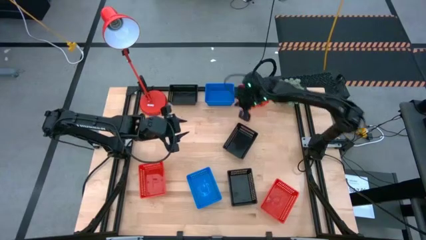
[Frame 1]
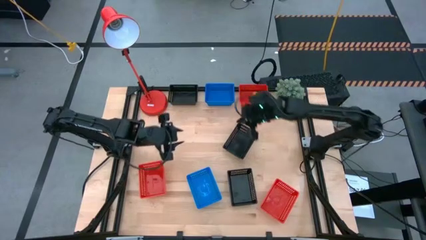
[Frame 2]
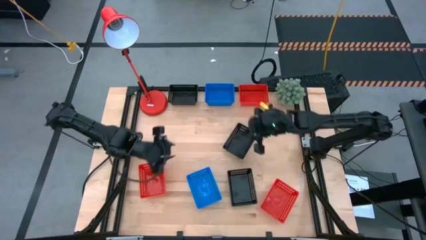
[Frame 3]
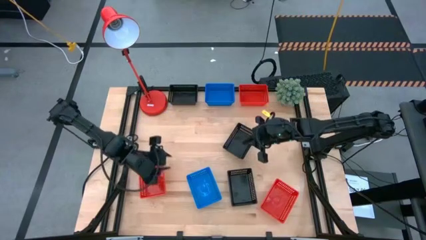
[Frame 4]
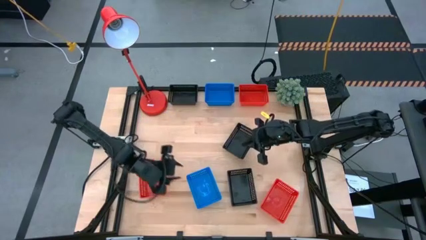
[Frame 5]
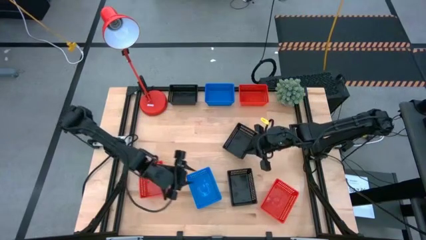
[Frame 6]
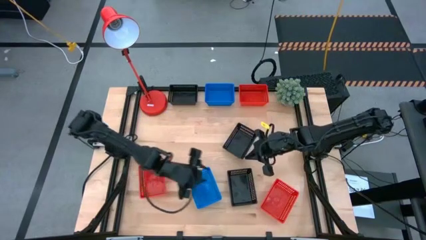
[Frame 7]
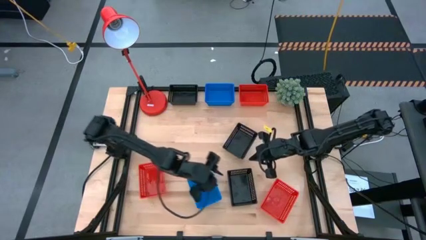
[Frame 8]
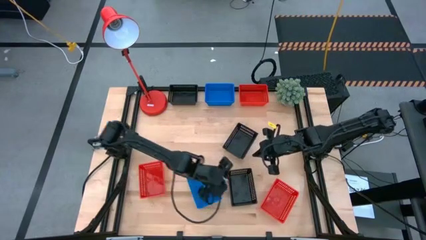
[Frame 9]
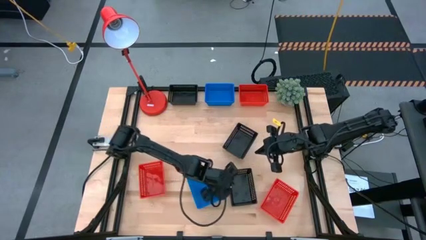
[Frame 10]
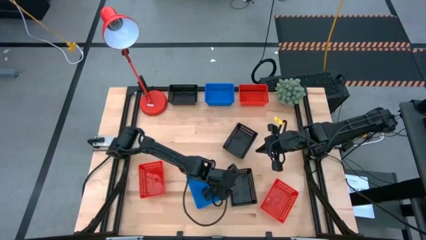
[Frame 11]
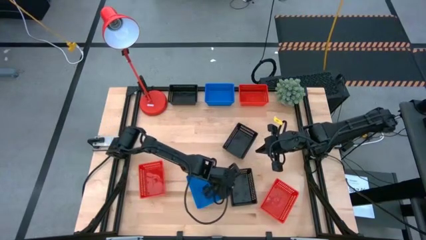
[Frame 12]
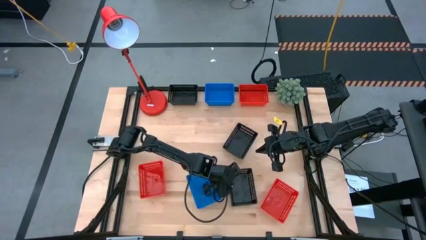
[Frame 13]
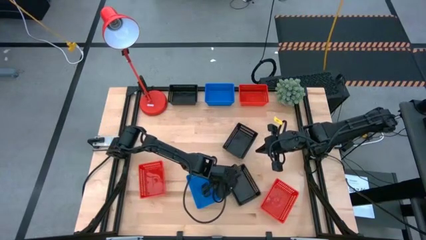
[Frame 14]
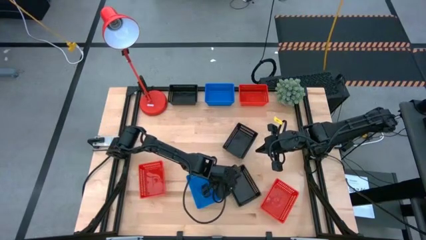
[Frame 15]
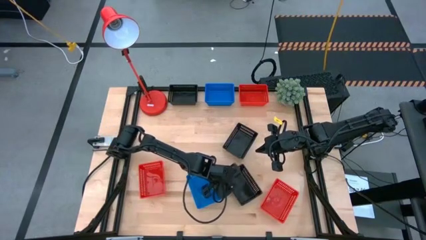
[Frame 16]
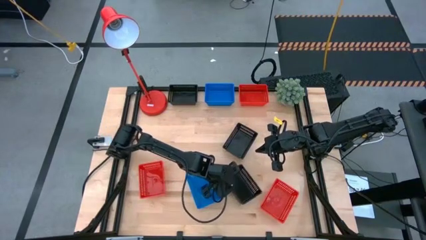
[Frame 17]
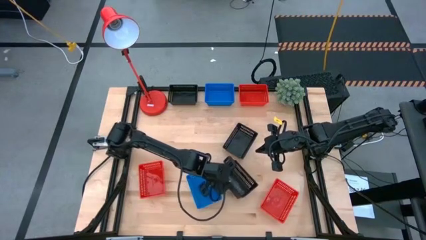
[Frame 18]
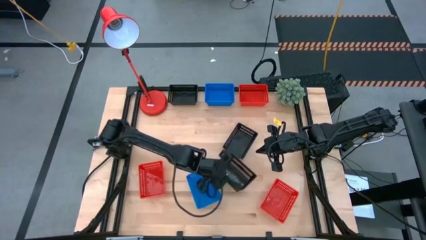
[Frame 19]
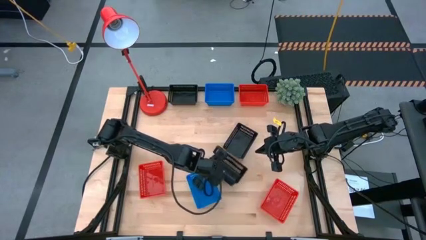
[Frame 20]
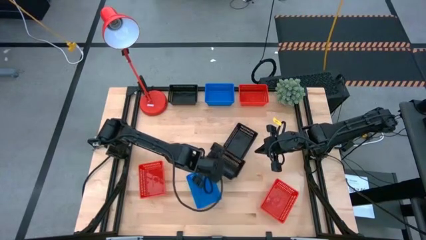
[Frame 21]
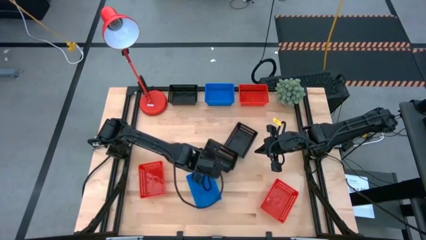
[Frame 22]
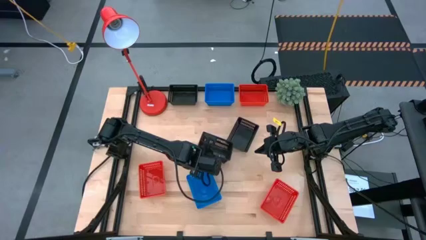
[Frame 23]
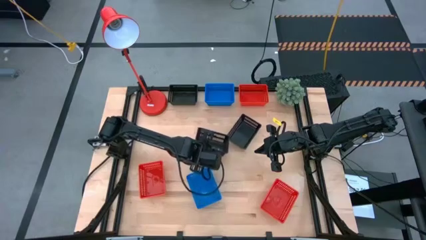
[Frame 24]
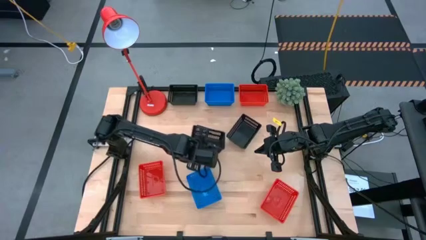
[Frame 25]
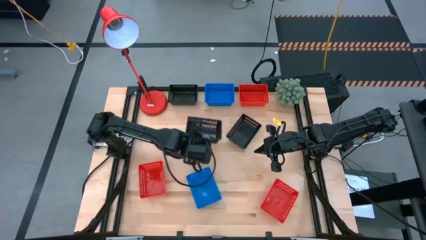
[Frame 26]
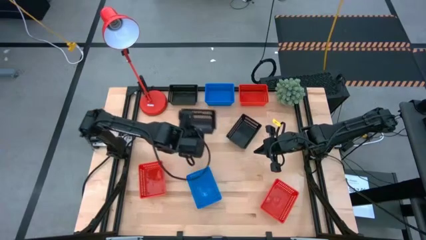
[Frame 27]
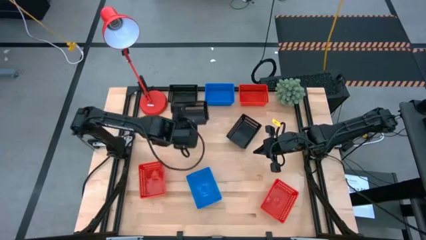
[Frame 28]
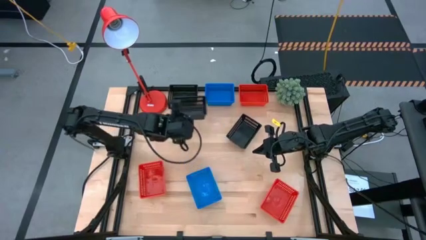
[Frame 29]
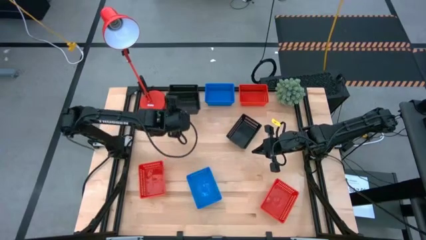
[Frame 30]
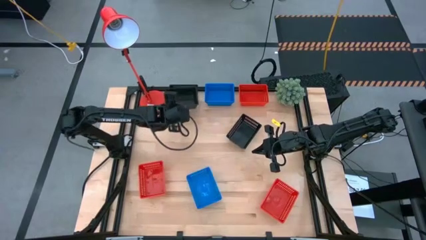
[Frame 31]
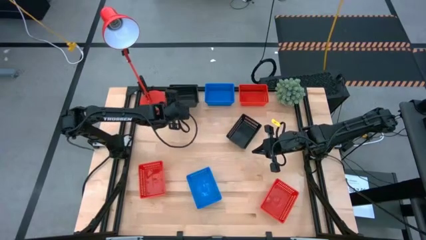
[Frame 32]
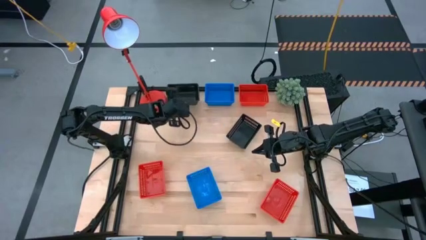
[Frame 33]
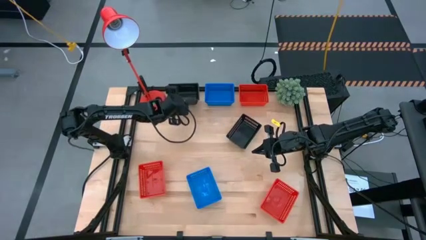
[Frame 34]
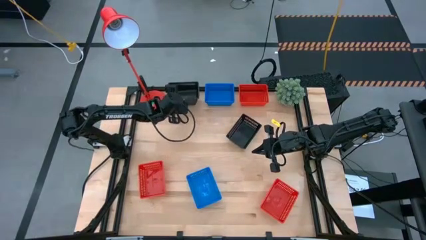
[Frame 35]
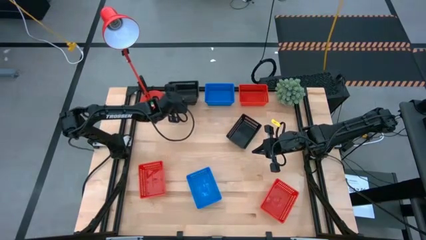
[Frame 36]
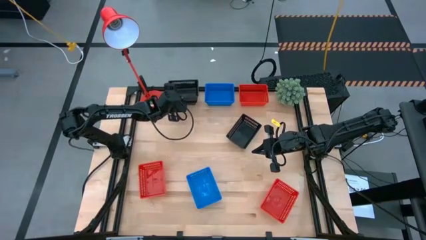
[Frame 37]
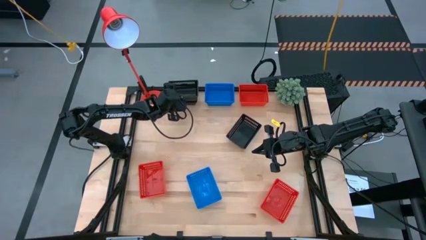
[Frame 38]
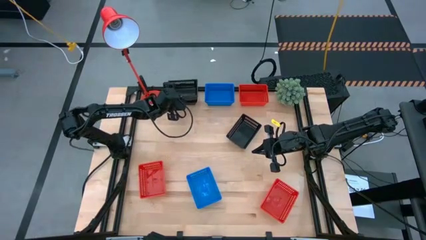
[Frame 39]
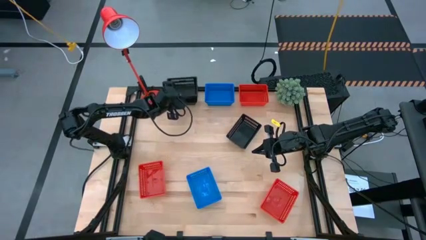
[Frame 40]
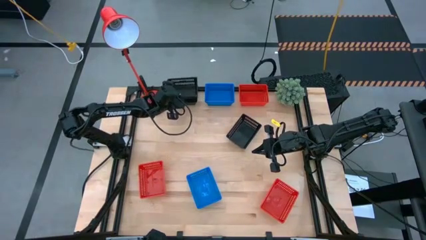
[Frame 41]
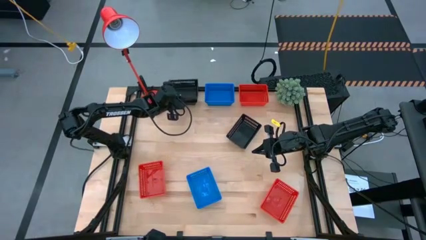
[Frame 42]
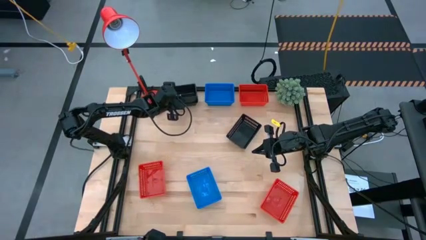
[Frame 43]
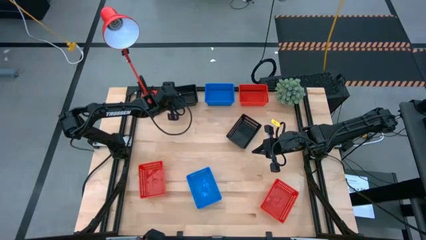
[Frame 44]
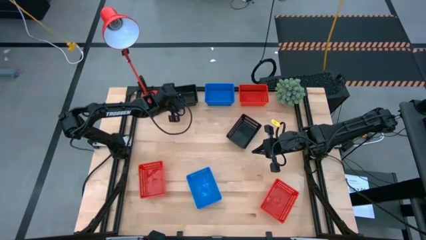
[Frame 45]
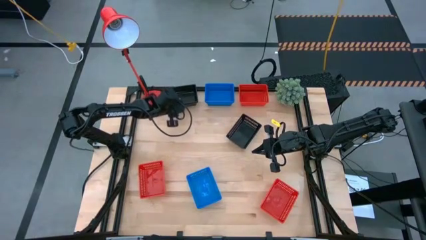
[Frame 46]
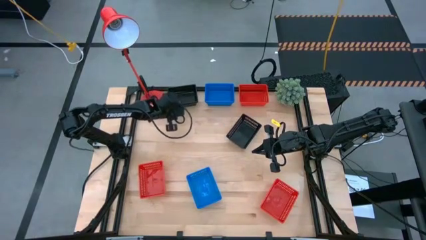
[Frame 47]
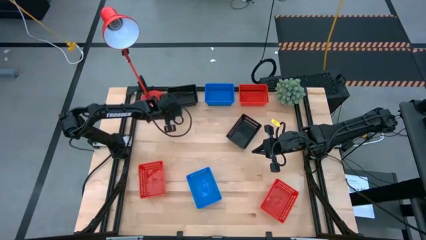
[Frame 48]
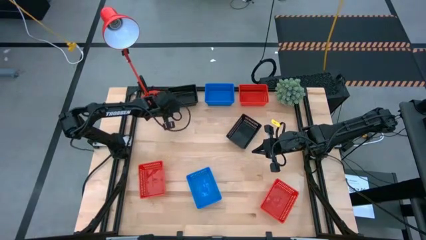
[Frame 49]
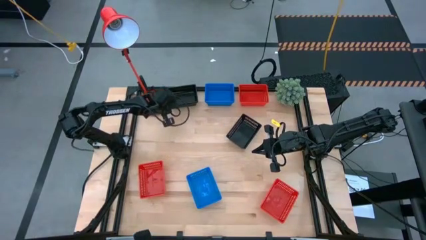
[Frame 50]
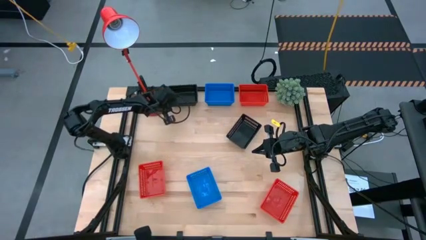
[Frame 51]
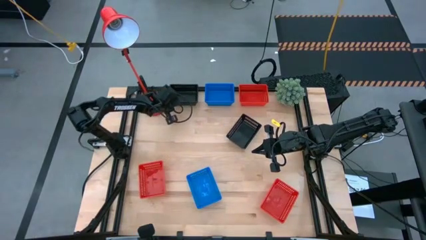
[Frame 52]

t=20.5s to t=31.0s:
Stack the bottom black bin on the top black bin
